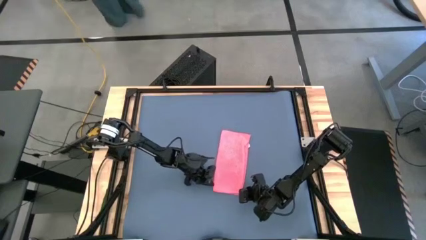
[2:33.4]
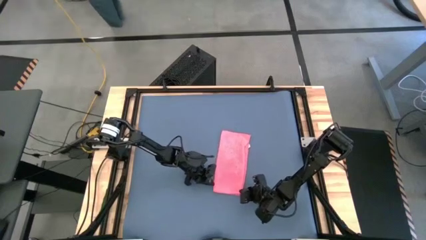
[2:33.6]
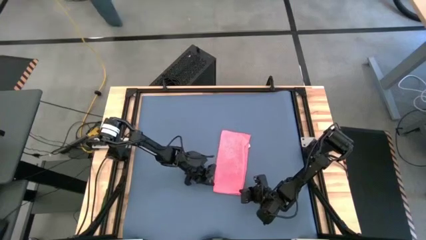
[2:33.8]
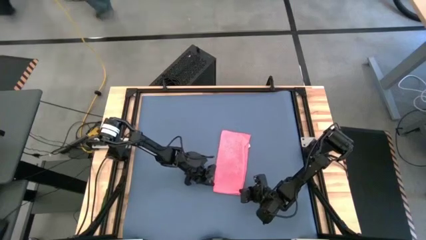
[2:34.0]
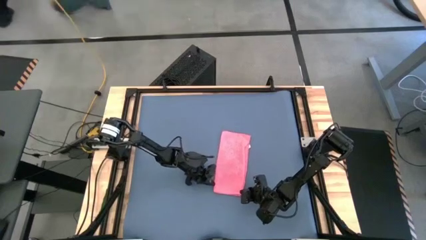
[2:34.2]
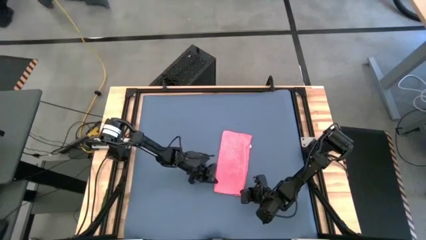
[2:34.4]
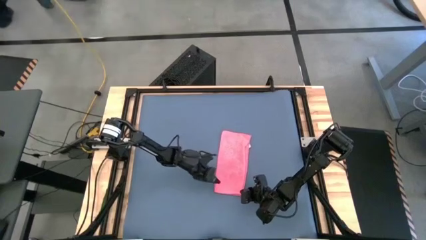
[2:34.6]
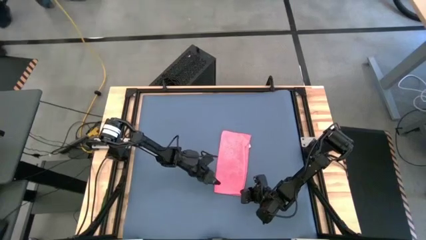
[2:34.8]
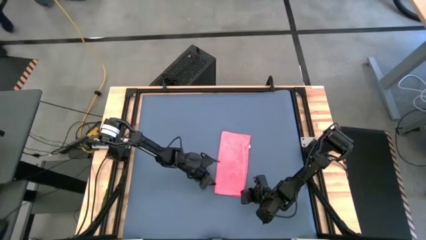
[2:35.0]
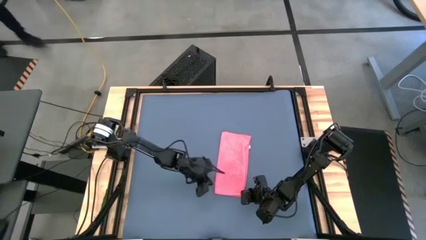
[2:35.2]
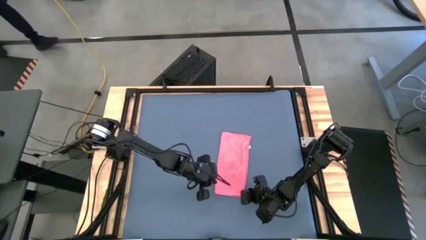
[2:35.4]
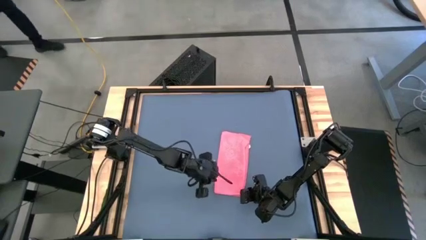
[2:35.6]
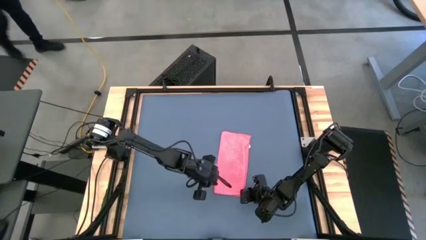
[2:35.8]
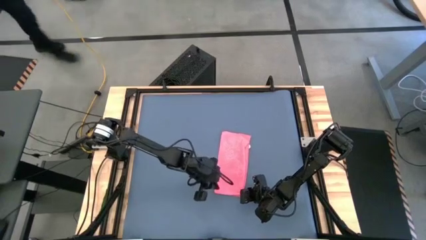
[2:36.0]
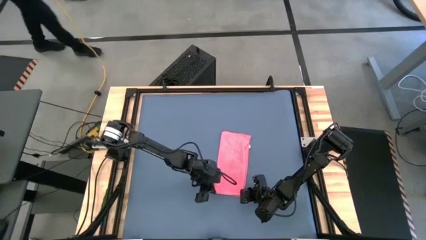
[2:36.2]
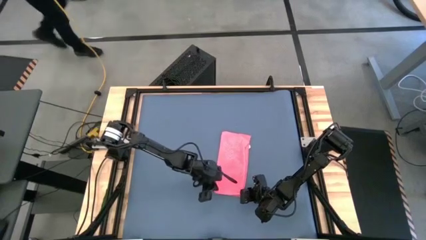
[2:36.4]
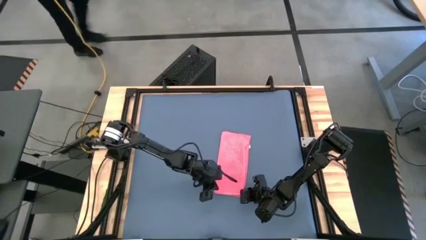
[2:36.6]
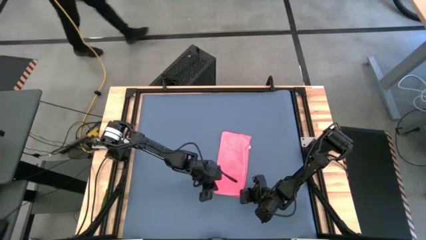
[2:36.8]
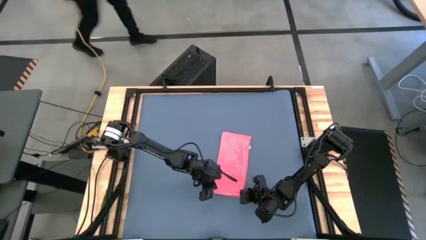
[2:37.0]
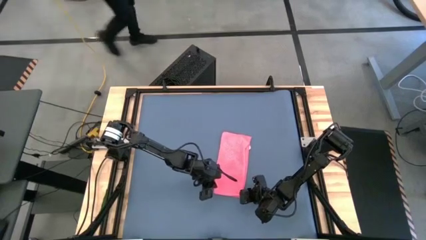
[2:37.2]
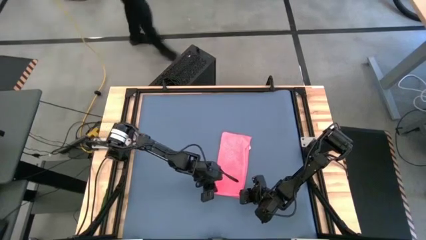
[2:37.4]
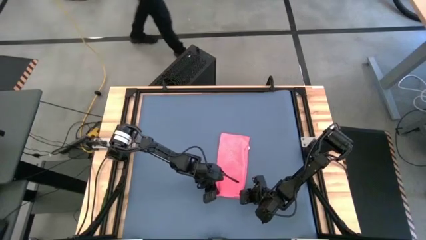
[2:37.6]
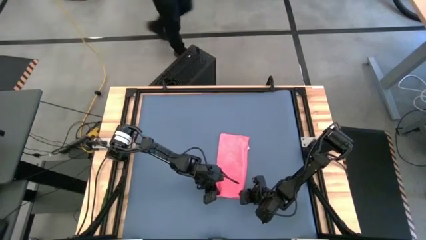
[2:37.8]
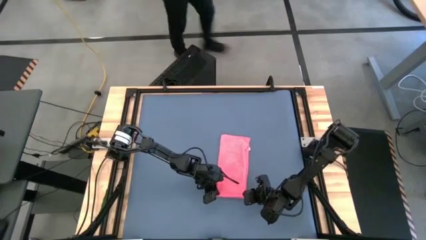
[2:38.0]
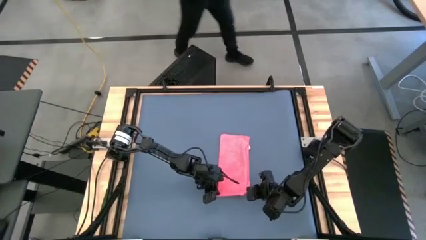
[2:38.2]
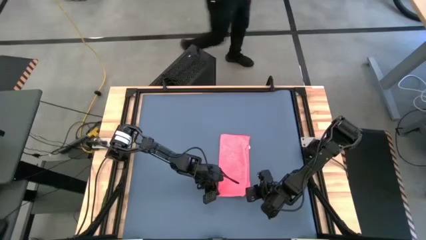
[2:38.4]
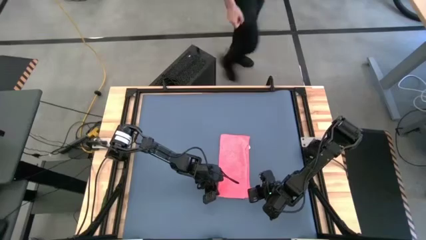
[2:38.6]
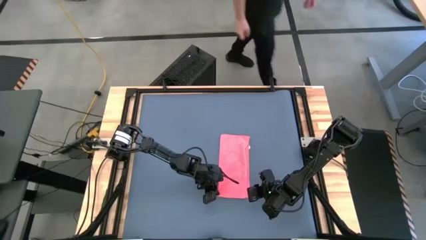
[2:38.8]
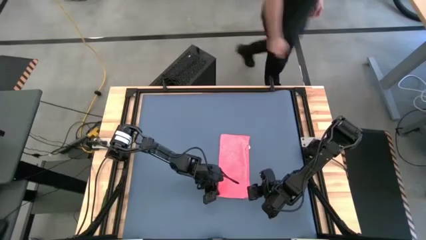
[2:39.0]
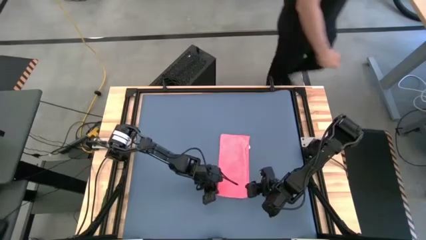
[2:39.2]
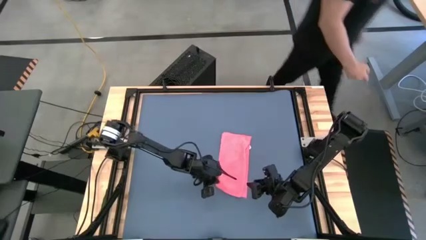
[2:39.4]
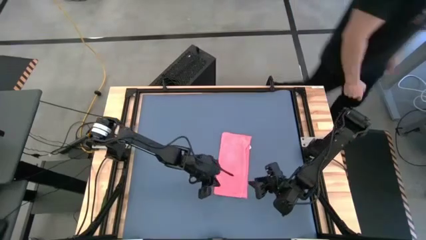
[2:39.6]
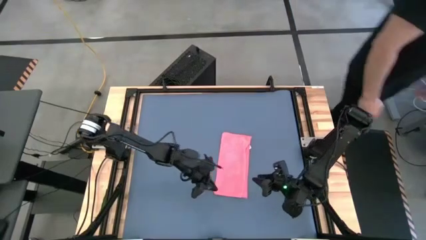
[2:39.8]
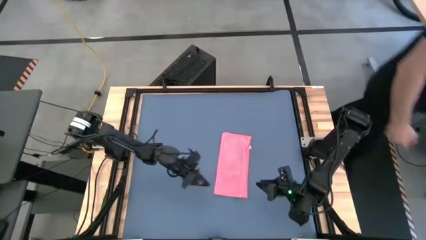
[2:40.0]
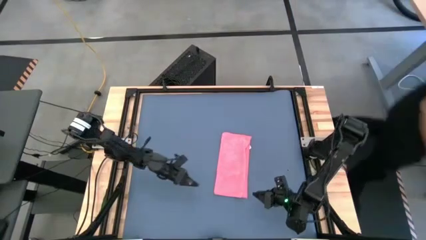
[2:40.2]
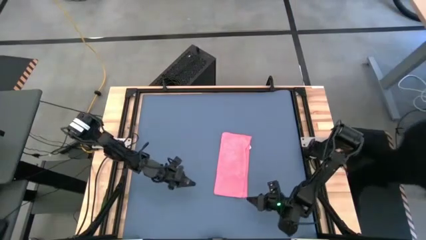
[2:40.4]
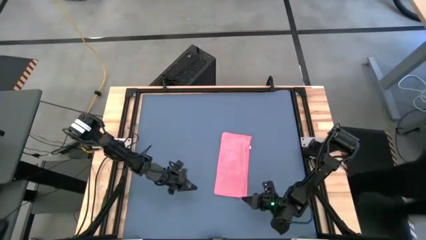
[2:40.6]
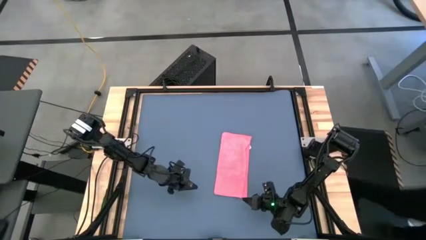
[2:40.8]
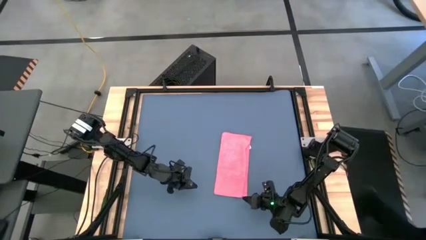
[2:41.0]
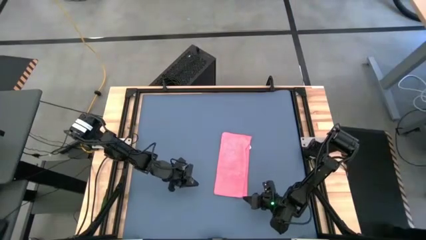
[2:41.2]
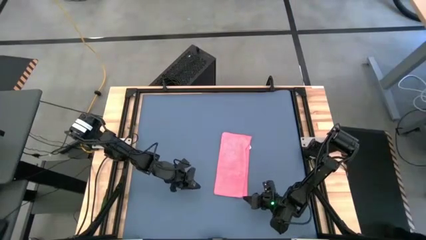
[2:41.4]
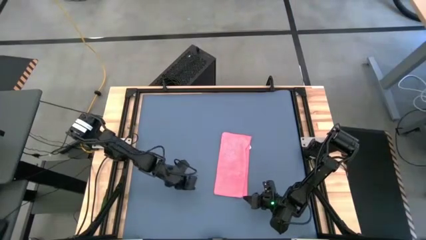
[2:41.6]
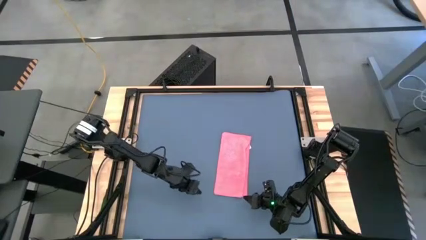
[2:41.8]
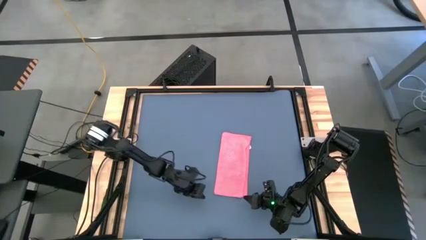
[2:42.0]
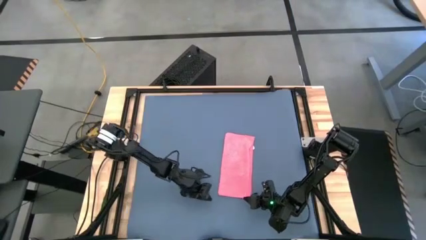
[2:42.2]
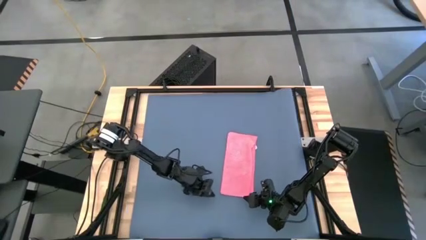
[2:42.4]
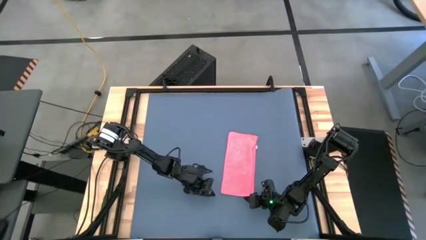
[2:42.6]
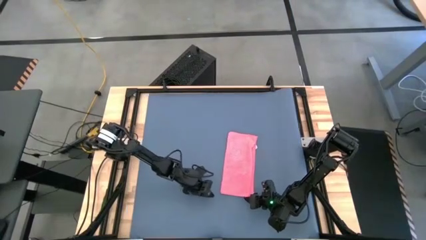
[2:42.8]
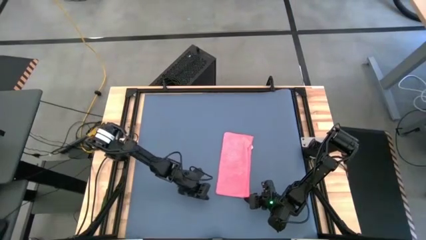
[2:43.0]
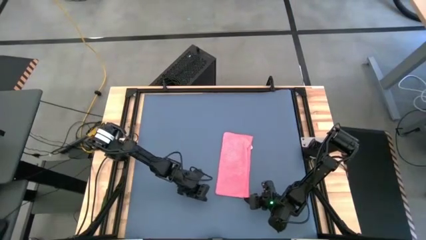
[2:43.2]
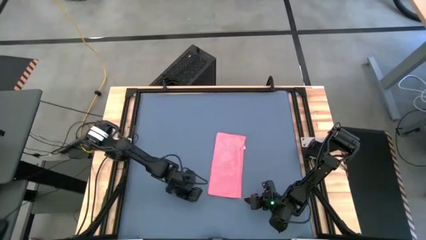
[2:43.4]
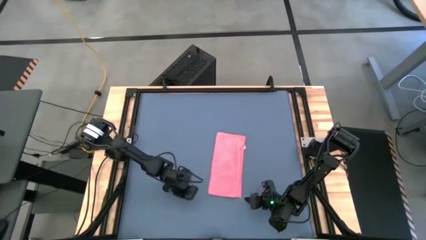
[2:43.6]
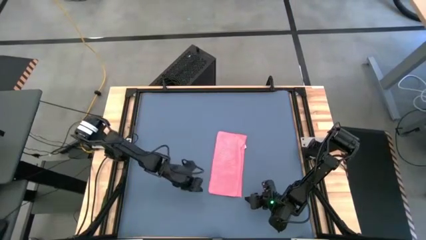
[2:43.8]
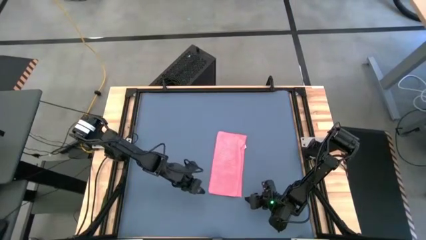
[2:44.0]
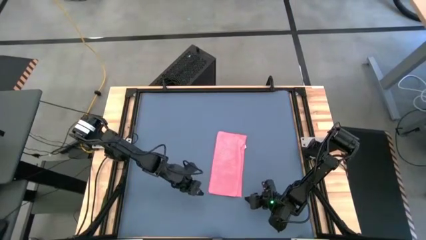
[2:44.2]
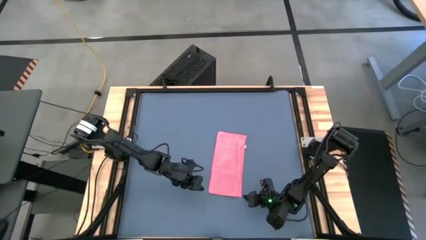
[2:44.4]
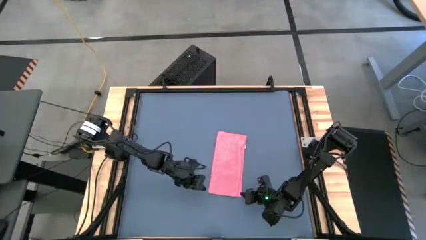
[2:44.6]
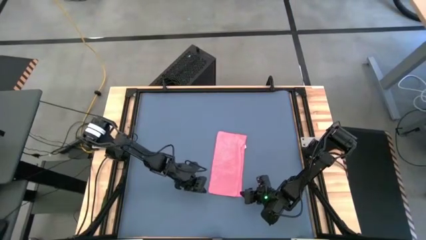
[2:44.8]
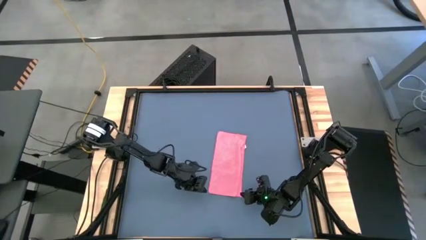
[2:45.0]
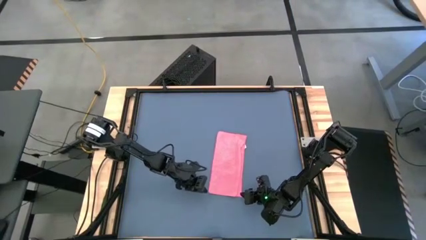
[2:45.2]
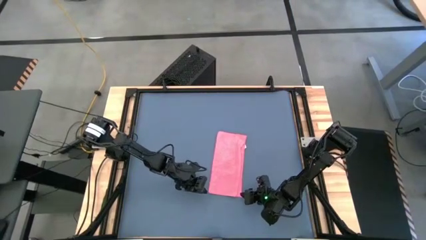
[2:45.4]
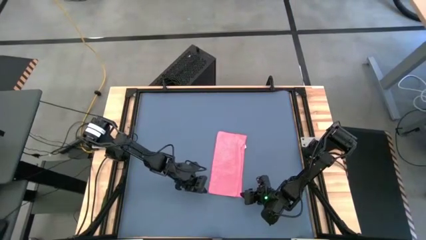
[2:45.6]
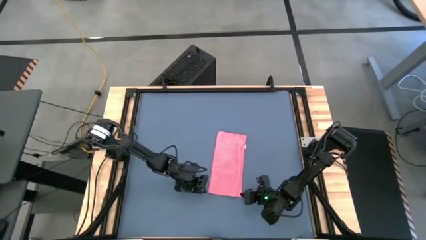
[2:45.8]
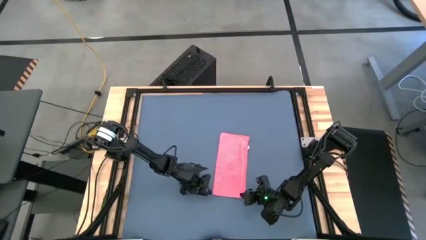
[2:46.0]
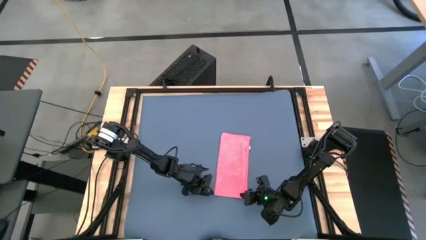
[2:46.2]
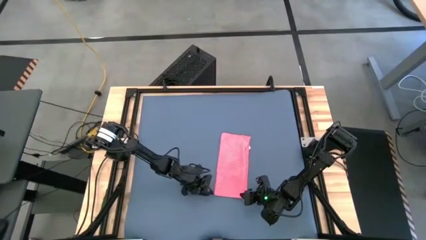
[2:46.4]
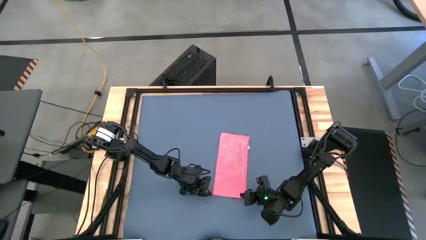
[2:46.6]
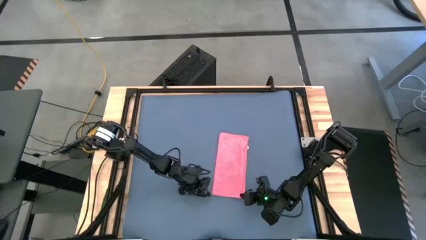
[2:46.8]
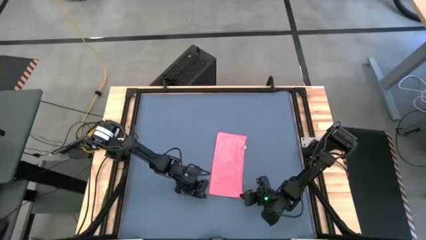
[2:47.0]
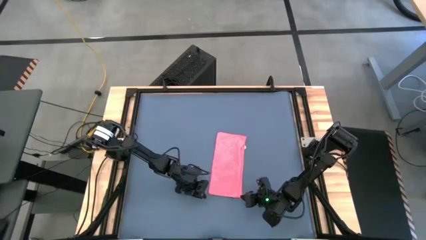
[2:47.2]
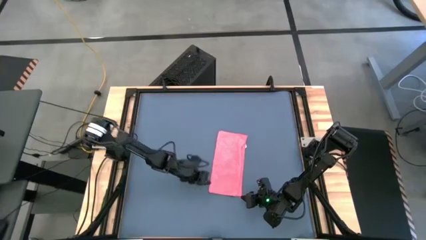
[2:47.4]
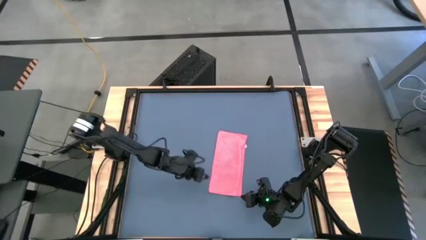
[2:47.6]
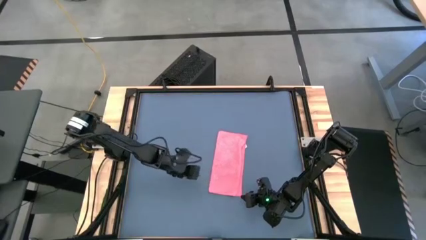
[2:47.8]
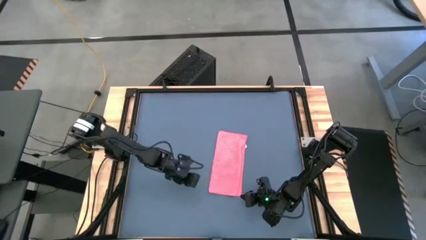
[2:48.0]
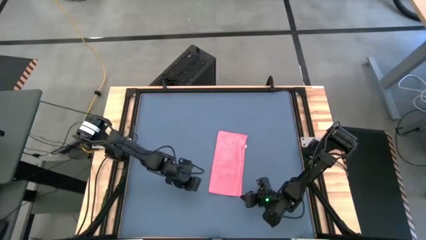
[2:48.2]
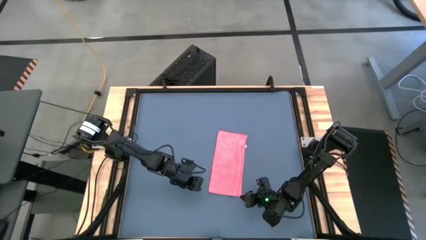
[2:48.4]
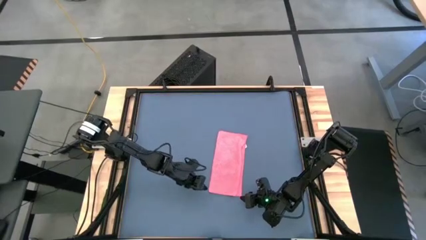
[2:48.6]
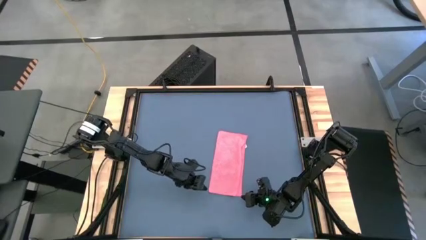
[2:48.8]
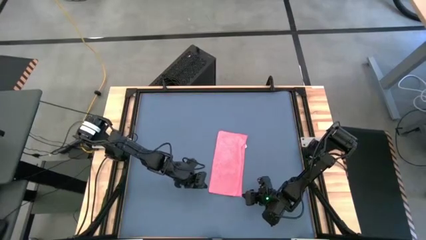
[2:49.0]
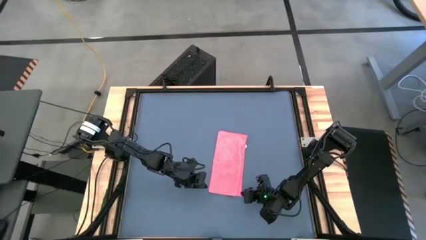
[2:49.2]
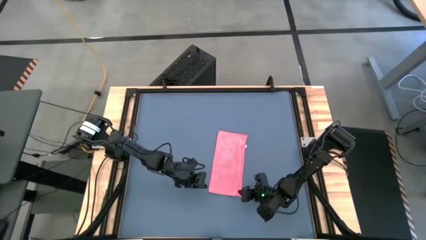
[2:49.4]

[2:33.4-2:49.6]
Task: Roll towel
Roll the pink microfiber towel
